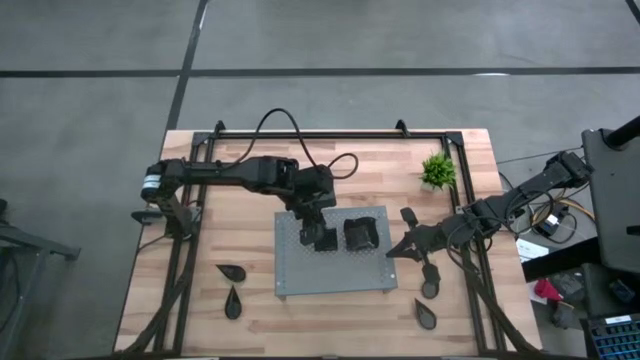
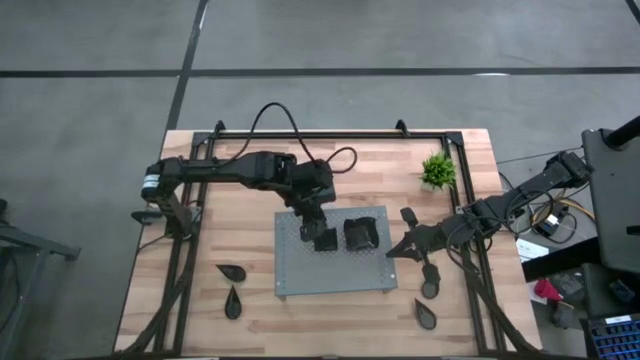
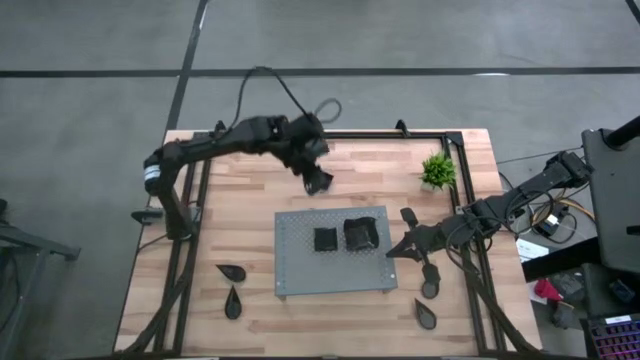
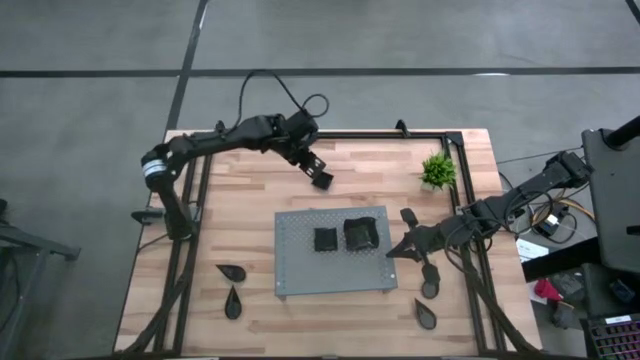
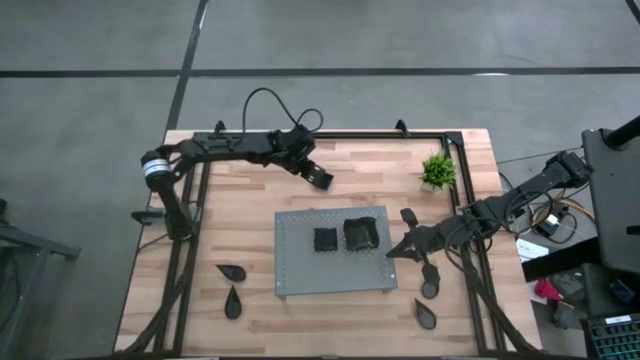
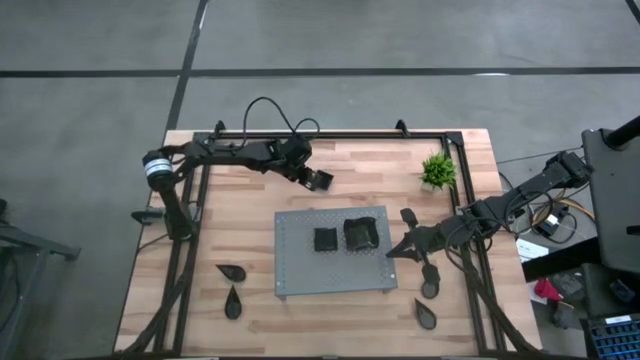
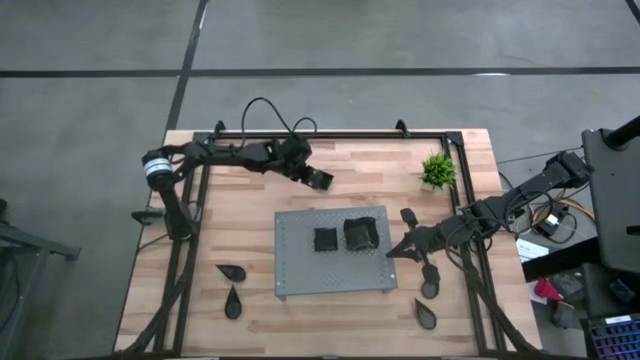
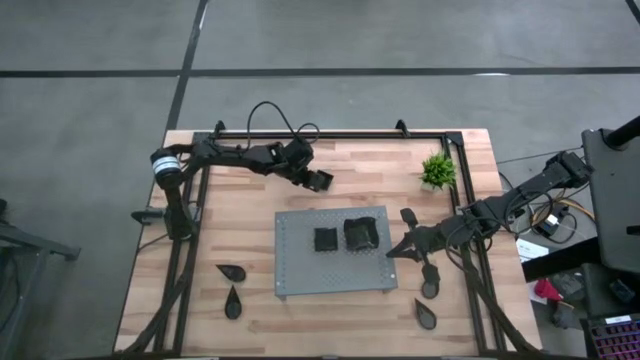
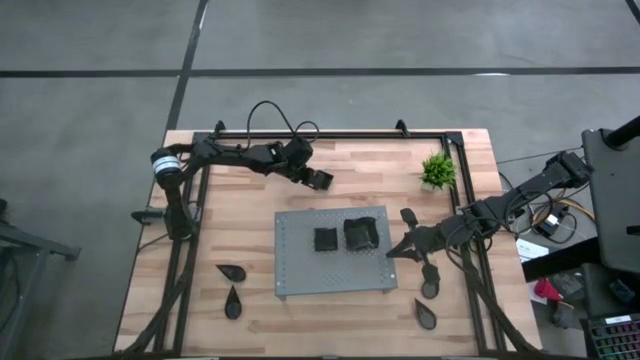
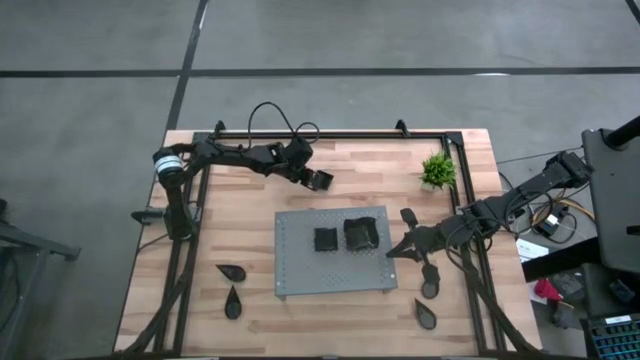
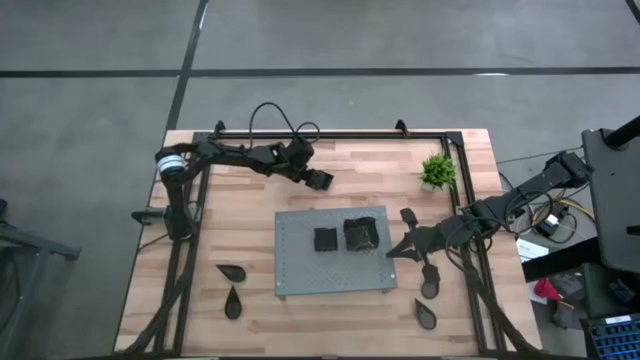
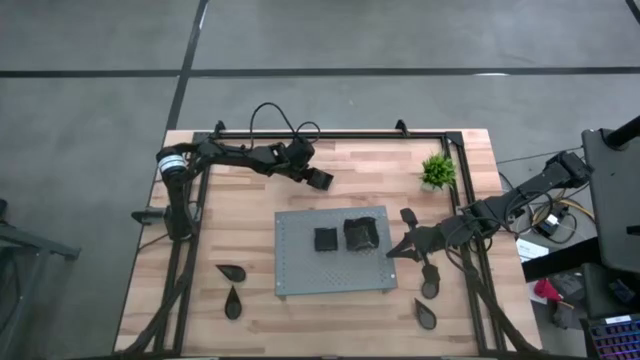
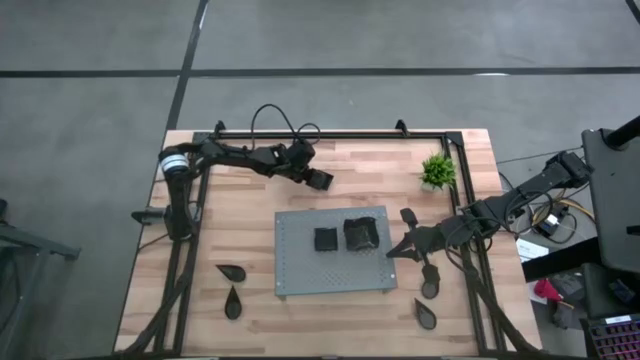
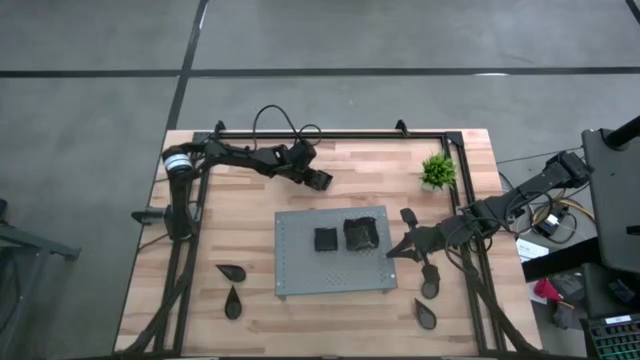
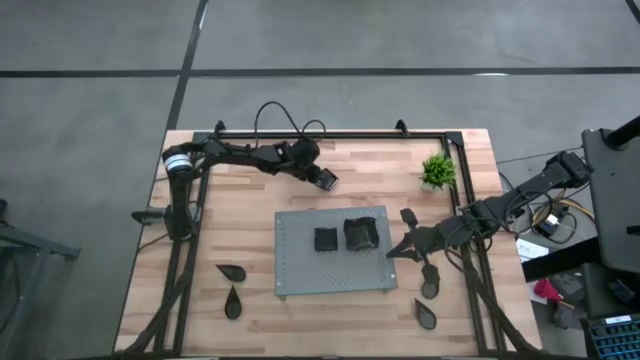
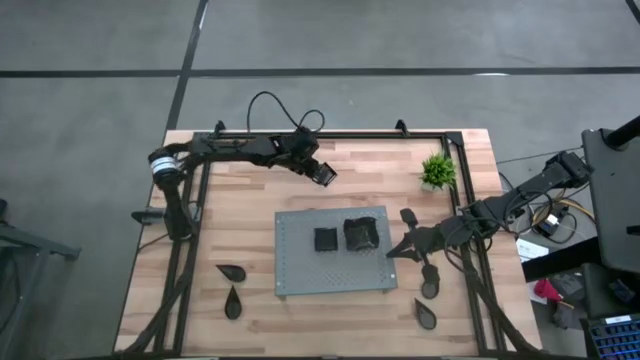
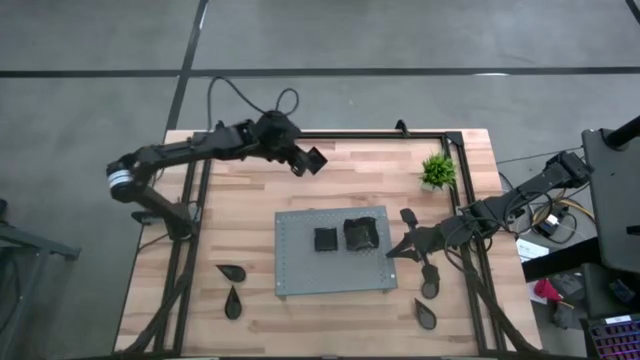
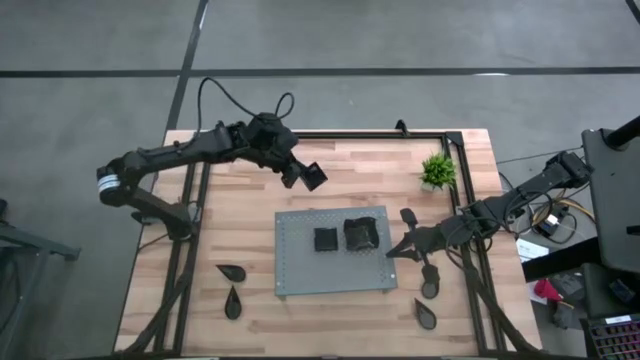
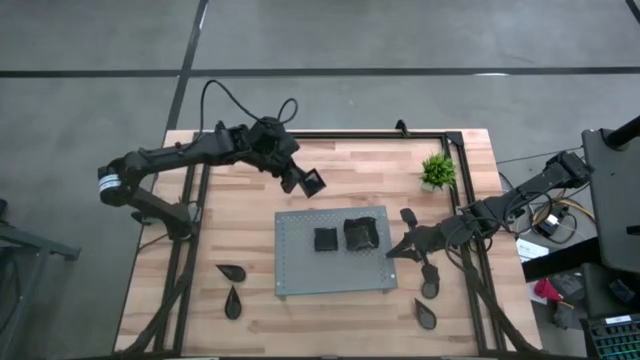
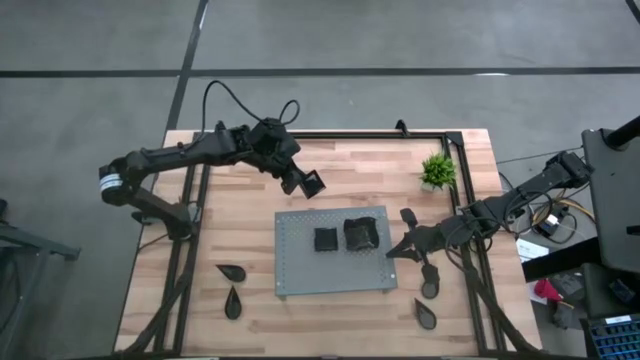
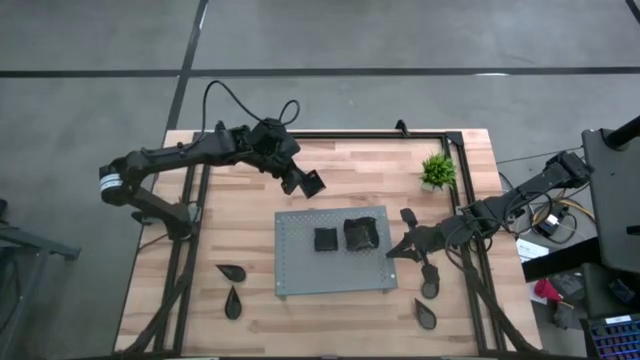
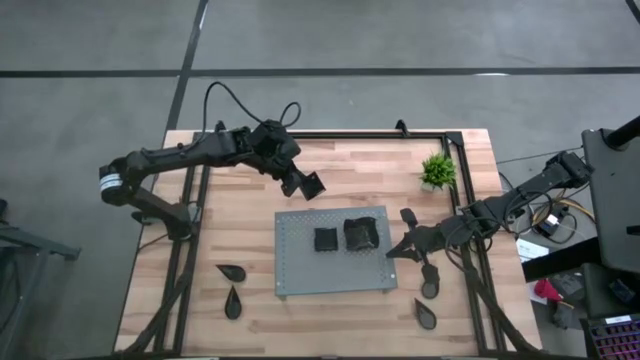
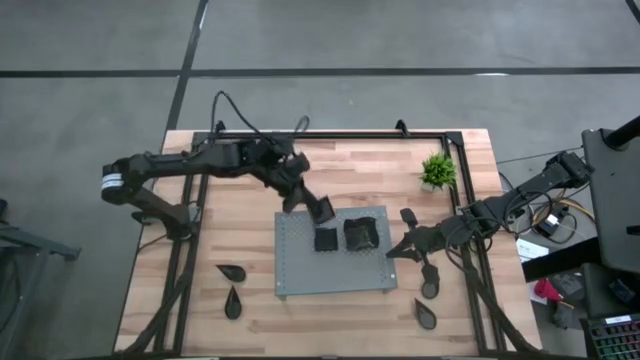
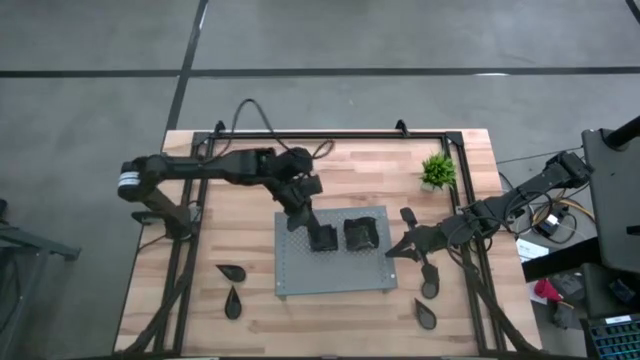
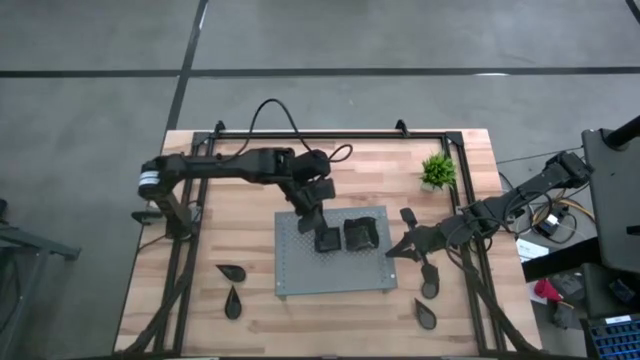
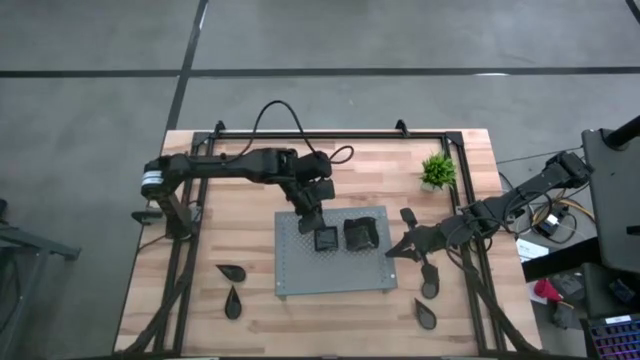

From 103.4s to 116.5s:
Task: Pick & Place Mini shaped plates
Stack the square plate on top of the square plate on the shelf

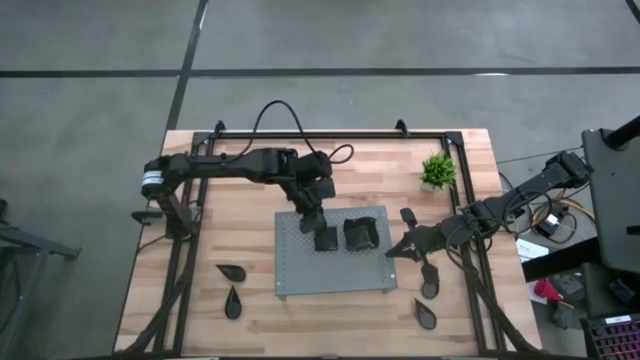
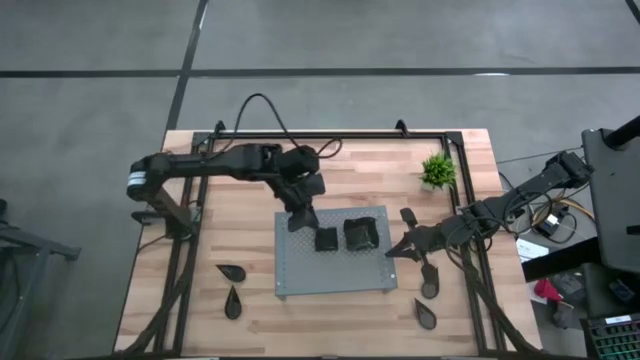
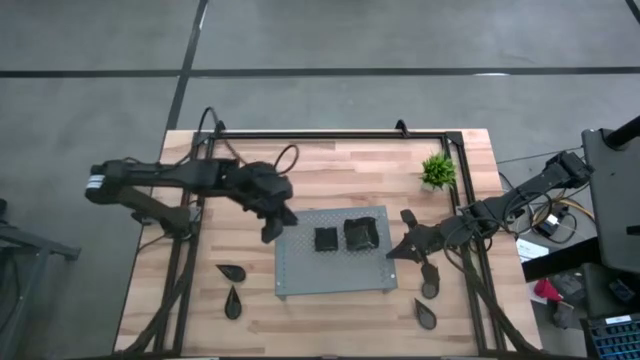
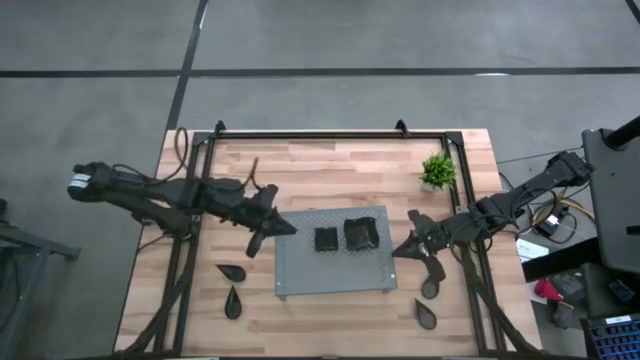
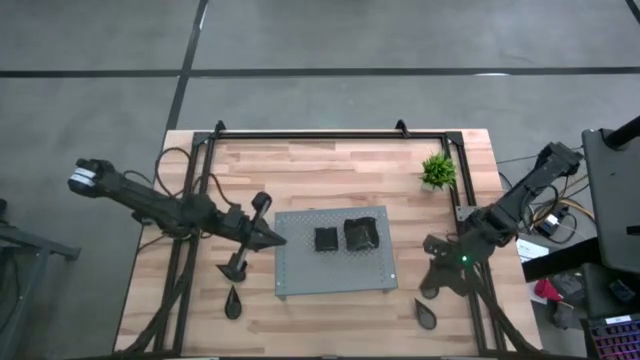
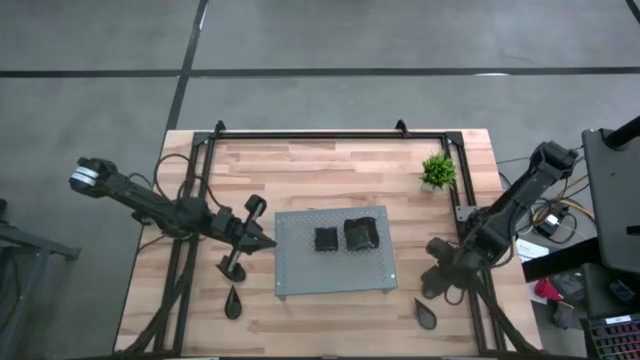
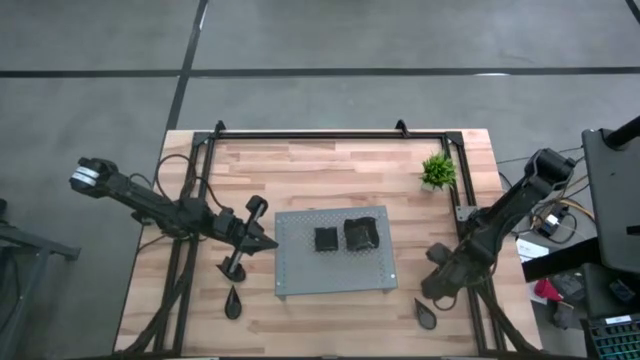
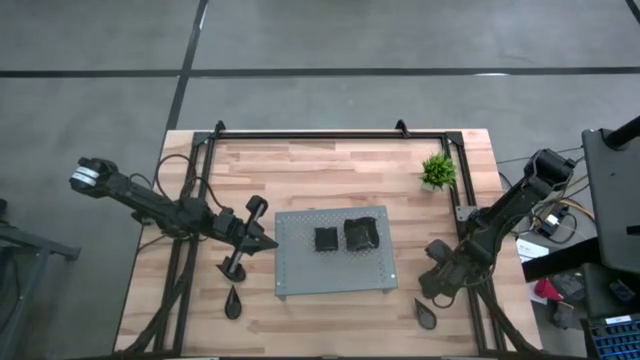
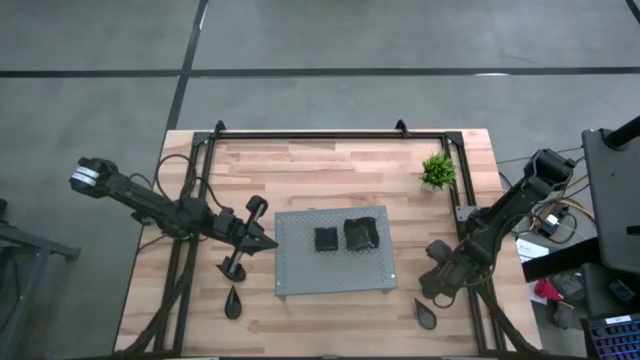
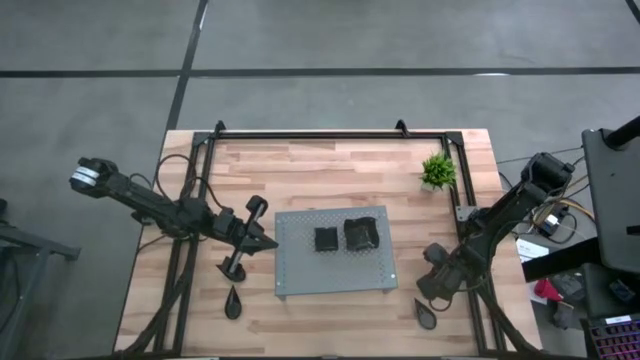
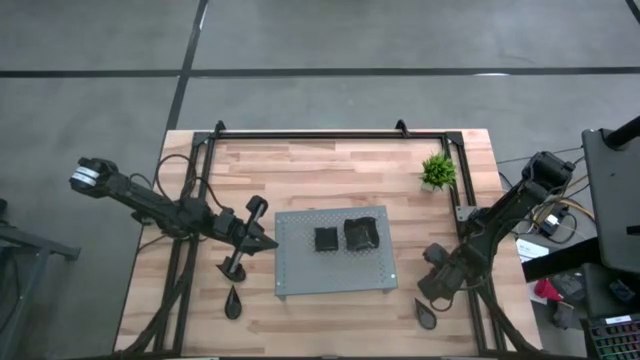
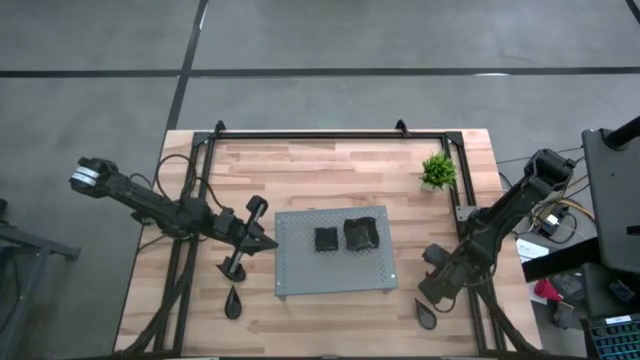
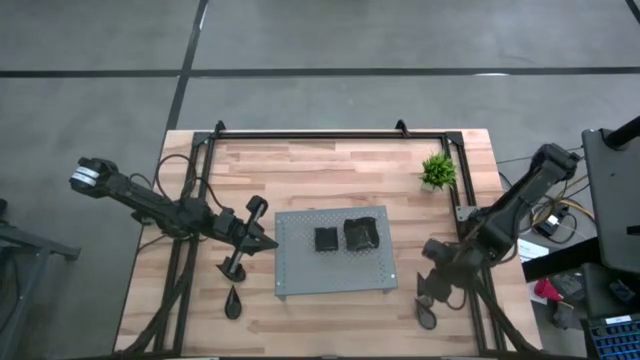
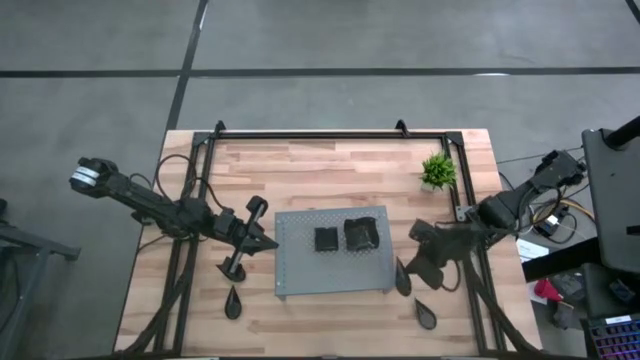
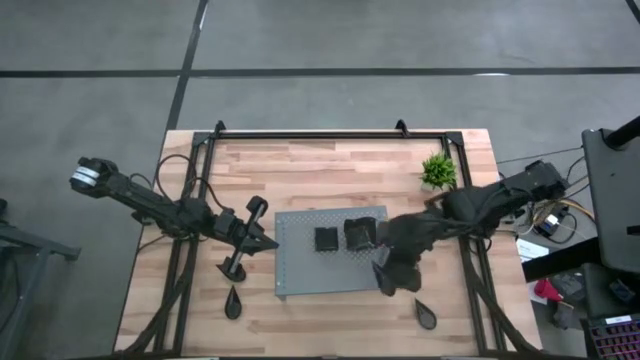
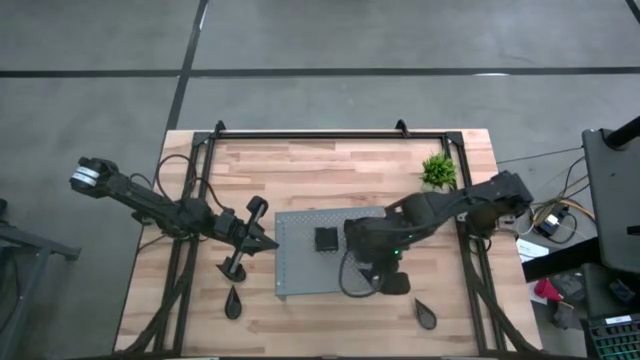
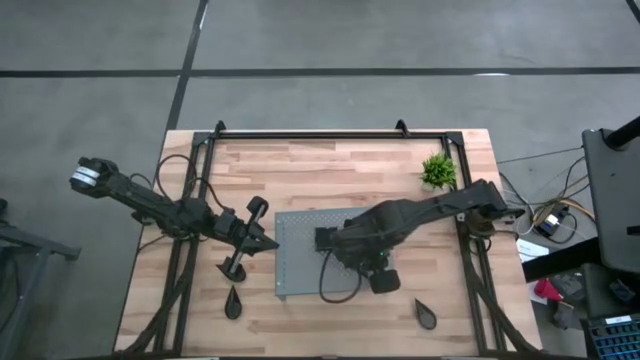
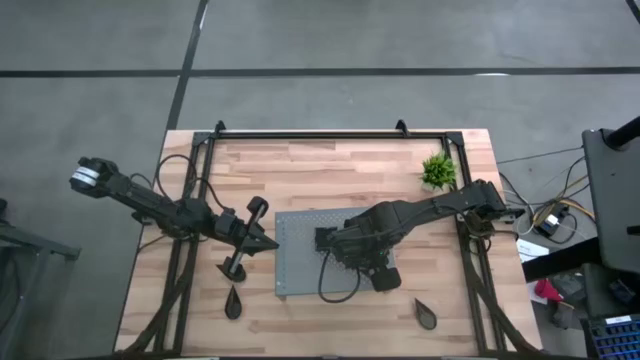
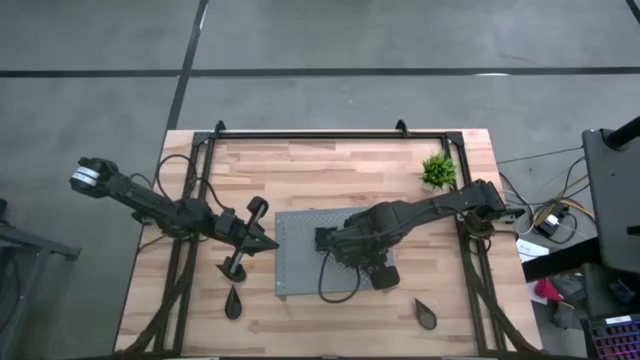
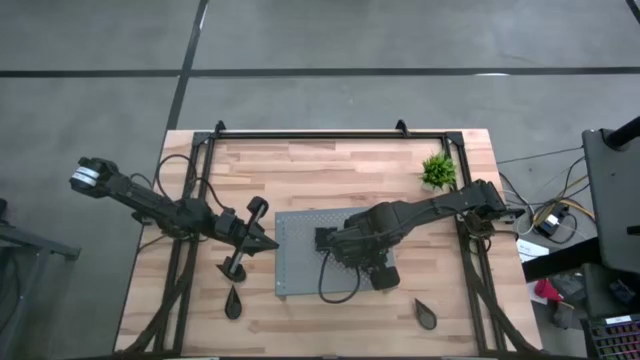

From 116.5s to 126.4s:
Put the drop shaped plate on the shelf
